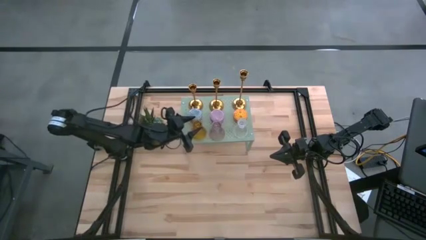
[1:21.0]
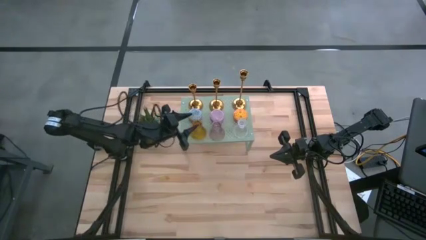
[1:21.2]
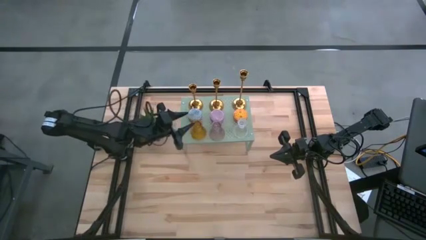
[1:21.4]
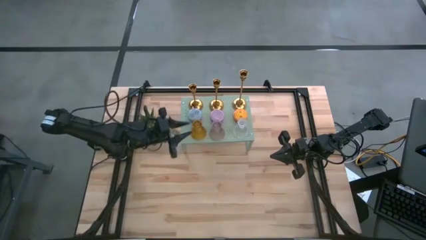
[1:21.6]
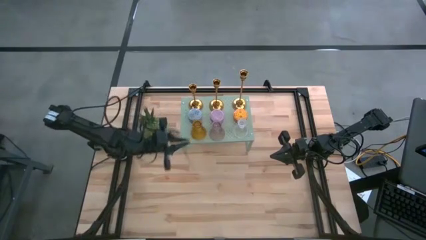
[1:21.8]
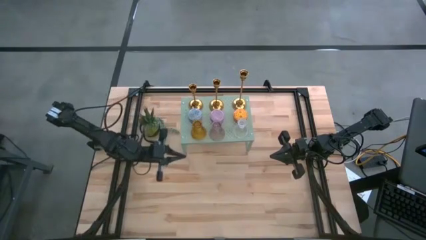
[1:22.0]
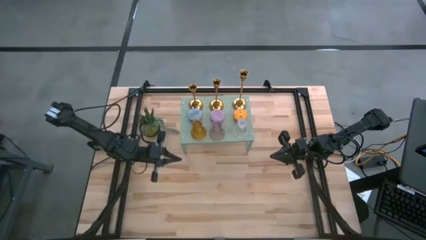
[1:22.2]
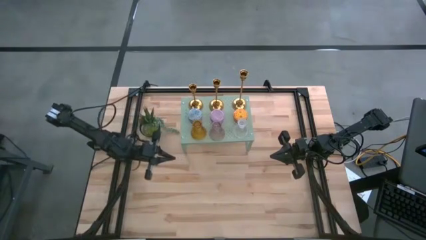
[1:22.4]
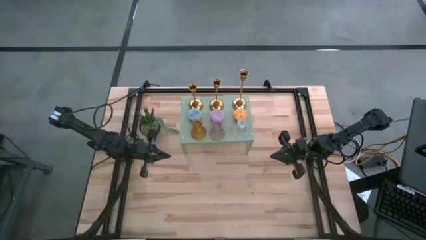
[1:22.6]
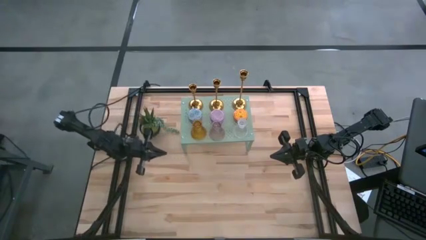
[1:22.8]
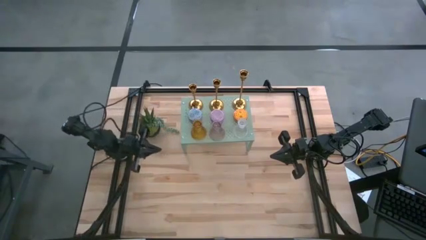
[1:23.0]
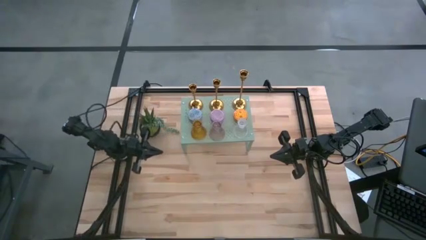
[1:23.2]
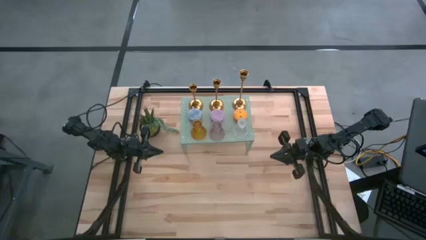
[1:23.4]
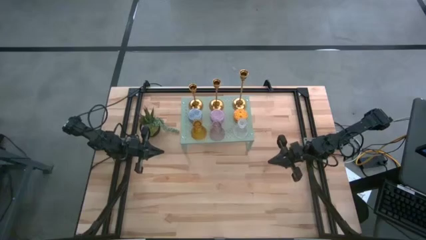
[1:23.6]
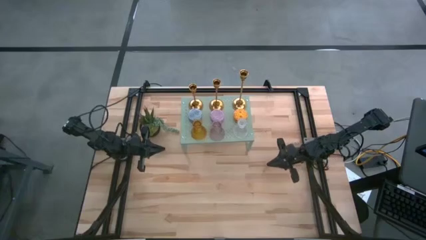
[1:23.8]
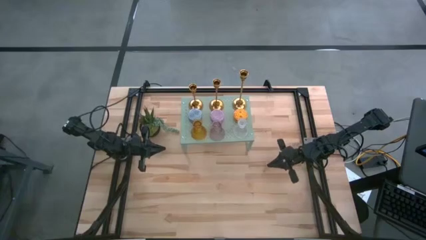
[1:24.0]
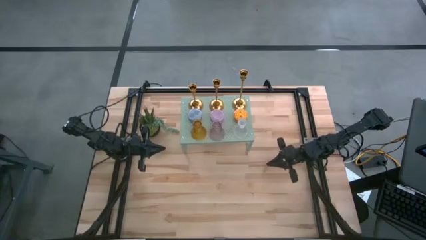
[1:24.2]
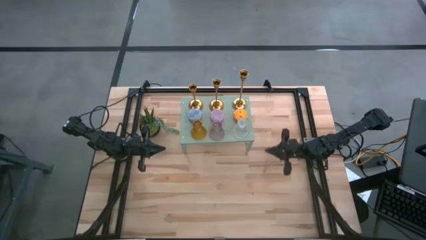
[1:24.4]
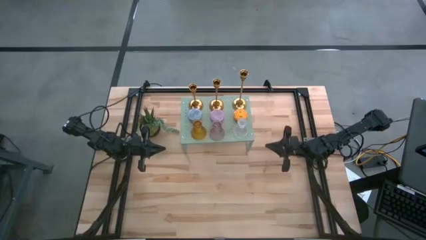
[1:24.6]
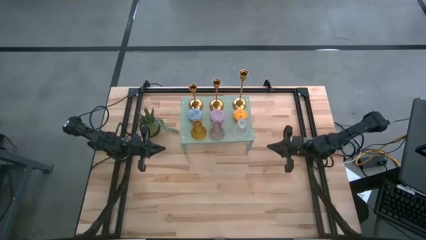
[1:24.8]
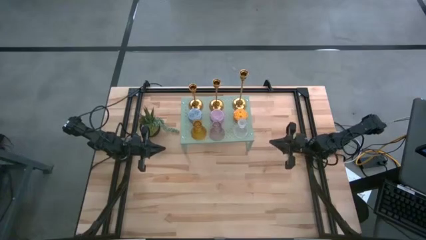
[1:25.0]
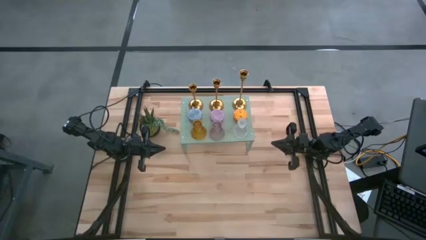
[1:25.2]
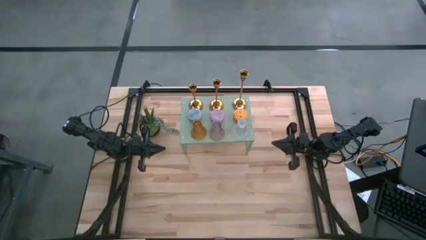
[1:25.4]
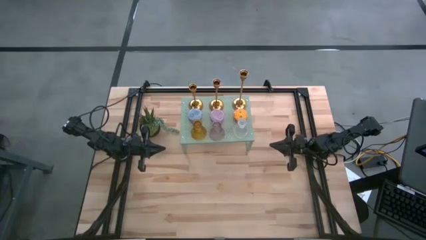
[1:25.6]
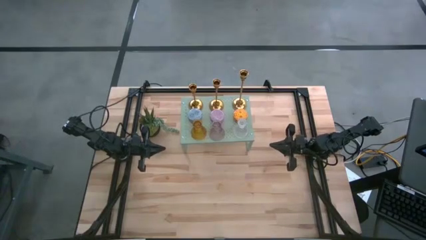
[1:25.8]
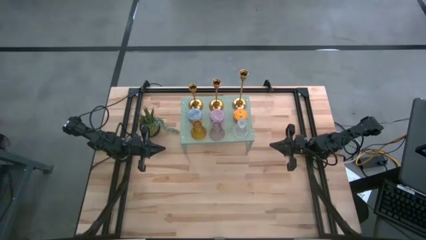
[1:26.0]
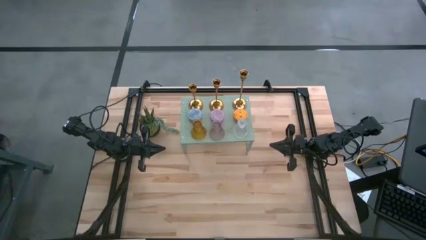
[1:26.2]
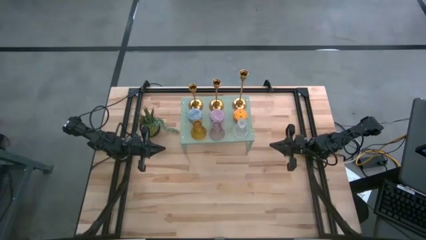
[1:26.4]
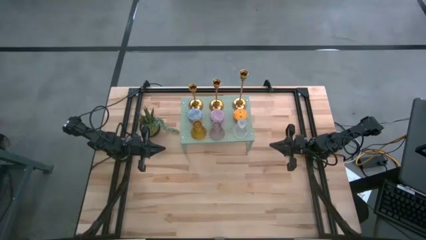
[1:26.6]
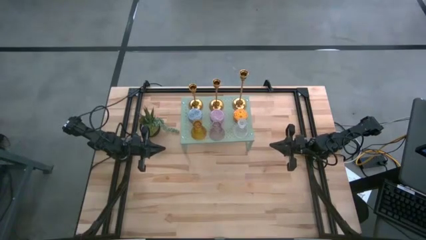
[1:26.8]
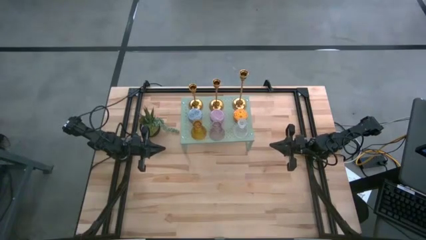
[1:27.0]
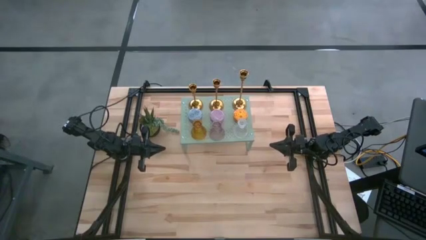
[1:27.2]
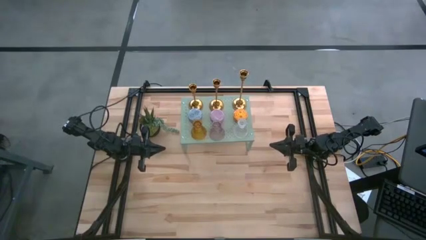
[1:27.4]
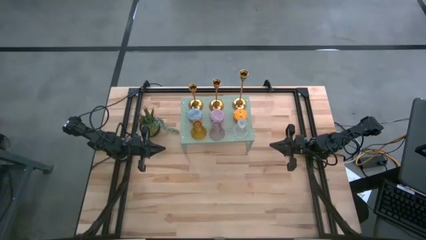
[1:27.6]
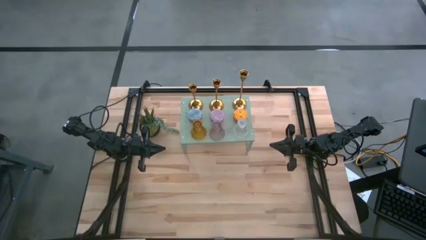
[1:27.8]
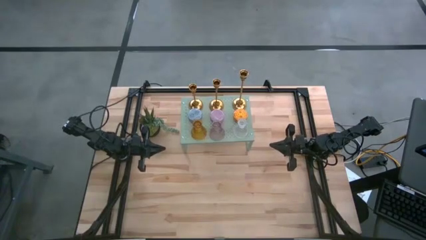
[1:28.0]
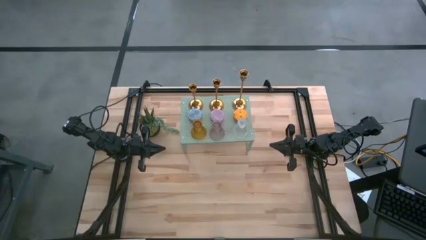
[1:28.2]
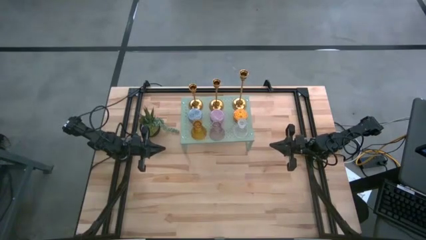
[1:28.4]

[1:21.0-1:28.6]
Task: Pick & Place candle stick holders
Return to Home Position

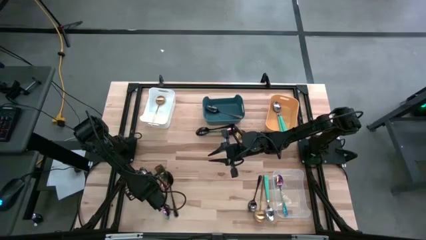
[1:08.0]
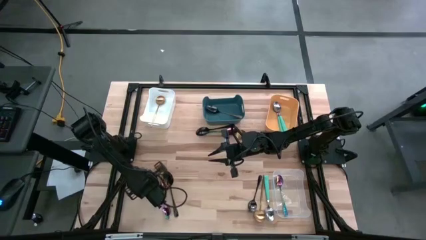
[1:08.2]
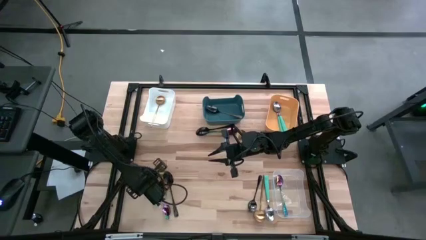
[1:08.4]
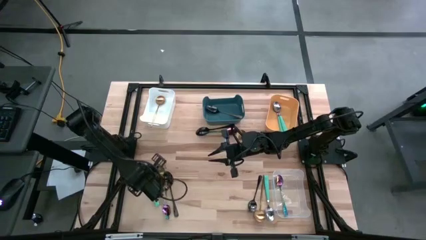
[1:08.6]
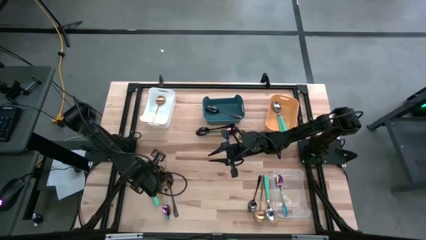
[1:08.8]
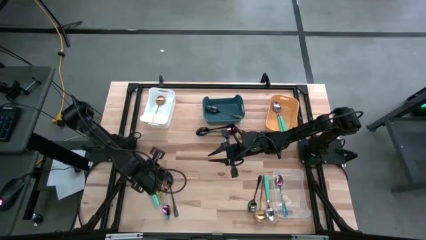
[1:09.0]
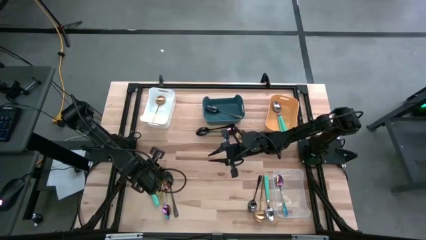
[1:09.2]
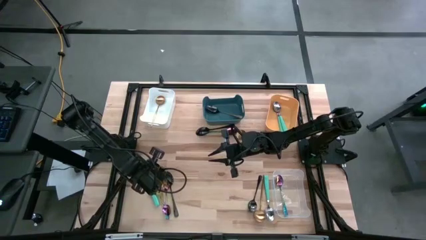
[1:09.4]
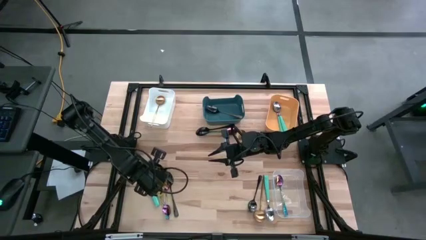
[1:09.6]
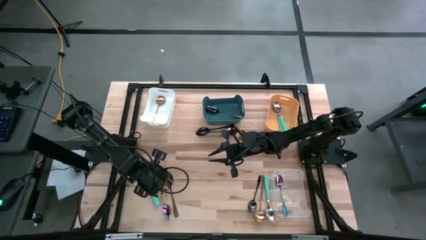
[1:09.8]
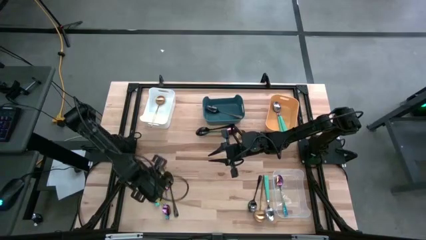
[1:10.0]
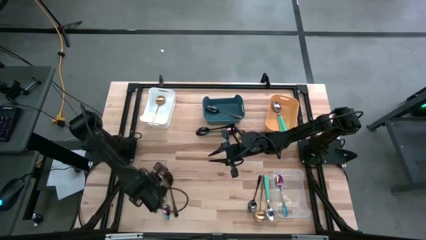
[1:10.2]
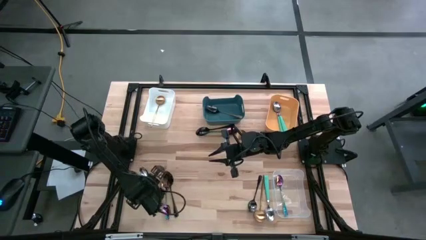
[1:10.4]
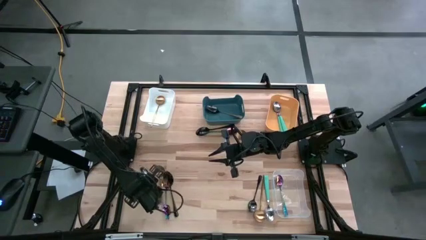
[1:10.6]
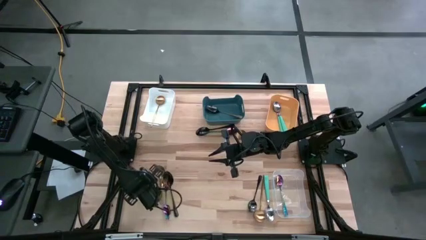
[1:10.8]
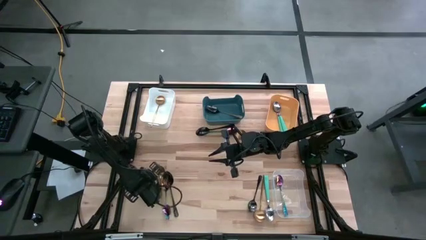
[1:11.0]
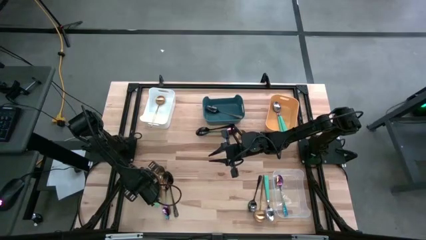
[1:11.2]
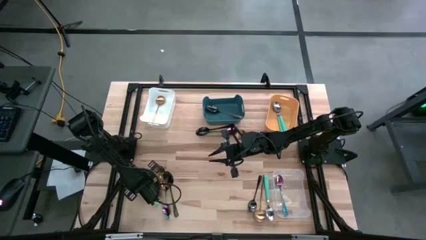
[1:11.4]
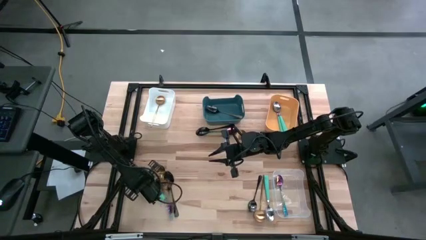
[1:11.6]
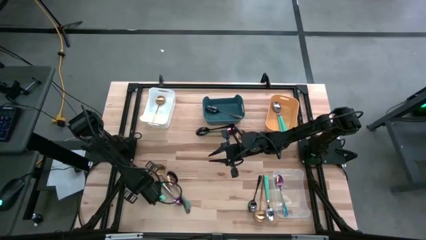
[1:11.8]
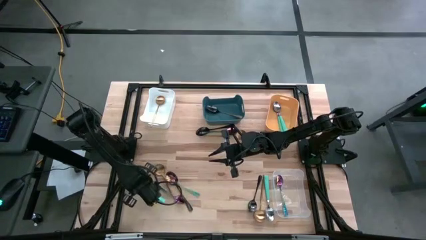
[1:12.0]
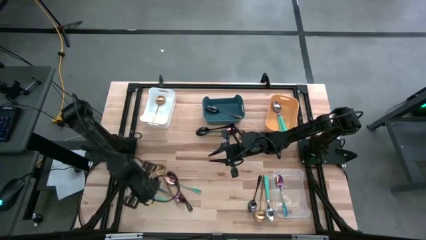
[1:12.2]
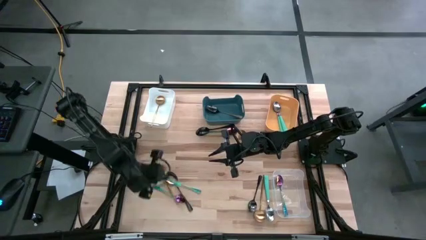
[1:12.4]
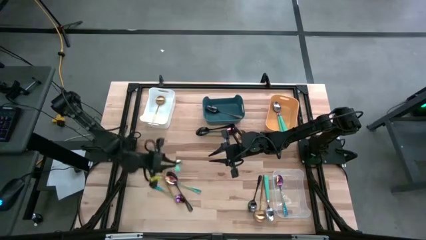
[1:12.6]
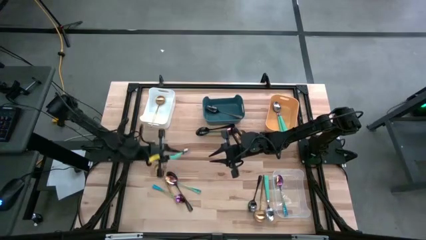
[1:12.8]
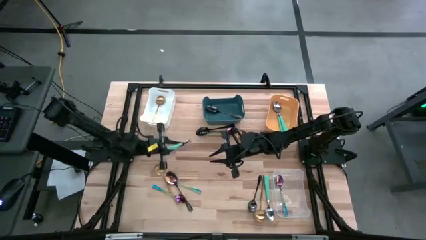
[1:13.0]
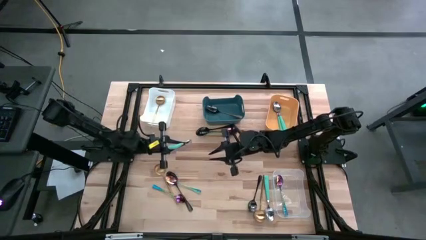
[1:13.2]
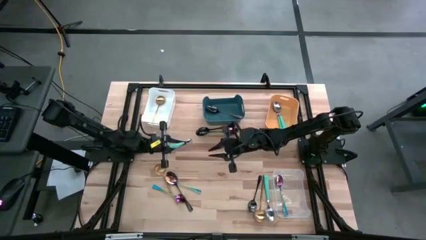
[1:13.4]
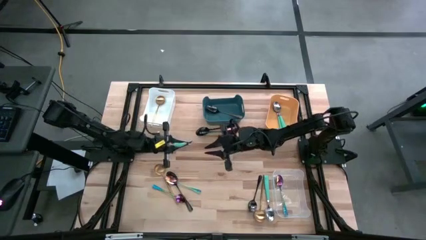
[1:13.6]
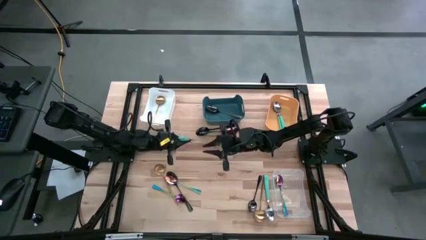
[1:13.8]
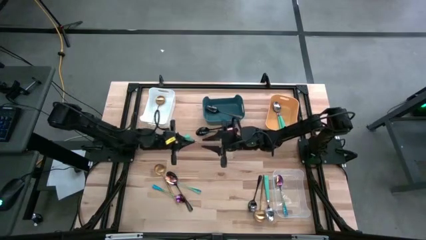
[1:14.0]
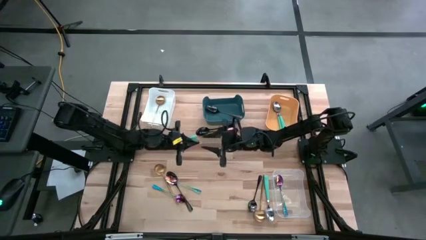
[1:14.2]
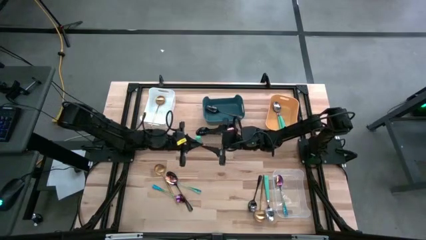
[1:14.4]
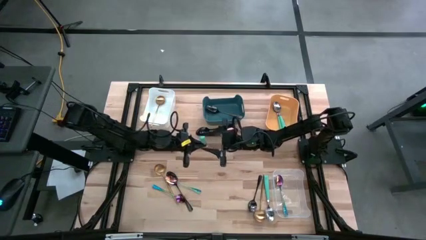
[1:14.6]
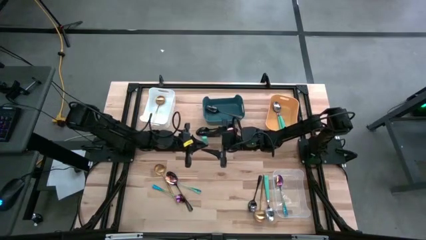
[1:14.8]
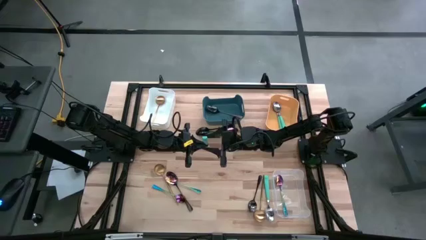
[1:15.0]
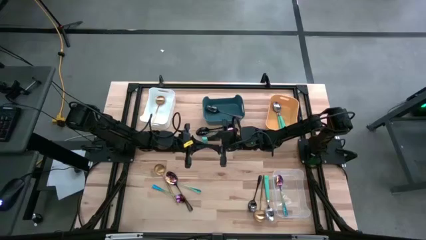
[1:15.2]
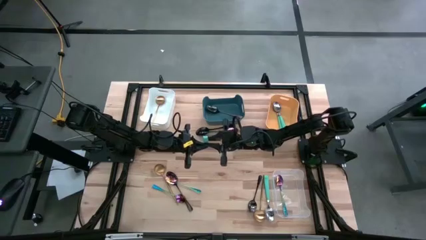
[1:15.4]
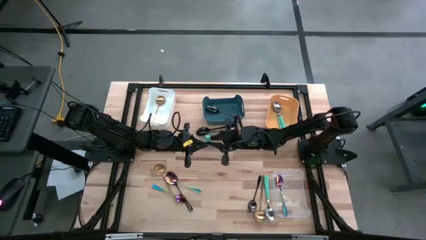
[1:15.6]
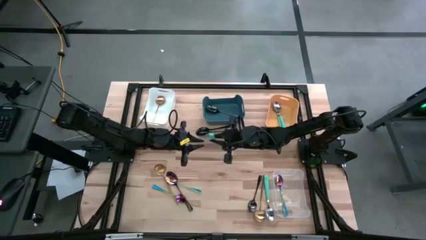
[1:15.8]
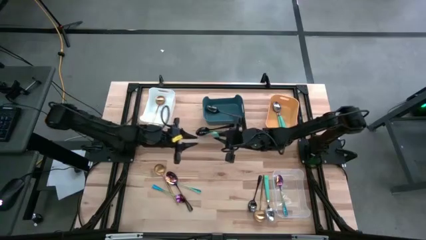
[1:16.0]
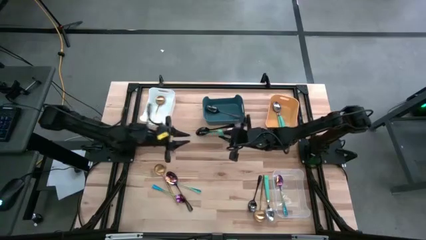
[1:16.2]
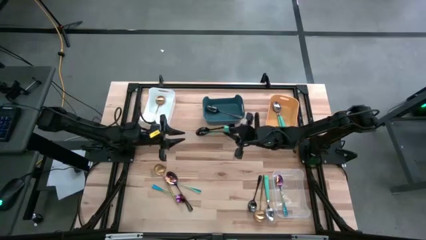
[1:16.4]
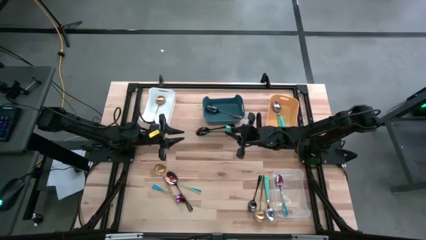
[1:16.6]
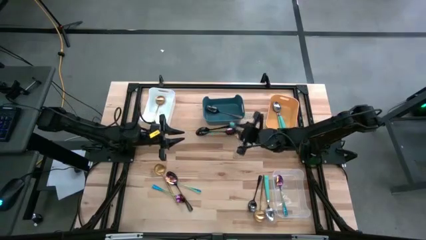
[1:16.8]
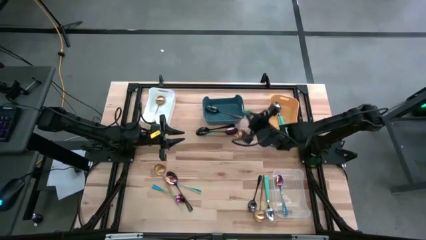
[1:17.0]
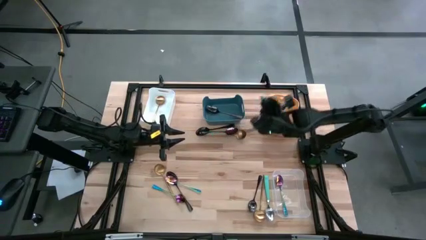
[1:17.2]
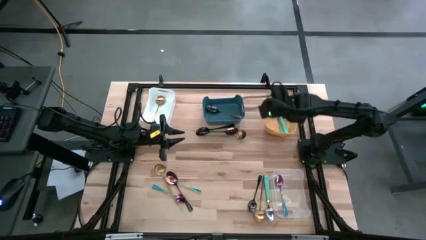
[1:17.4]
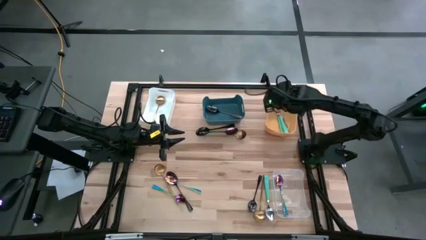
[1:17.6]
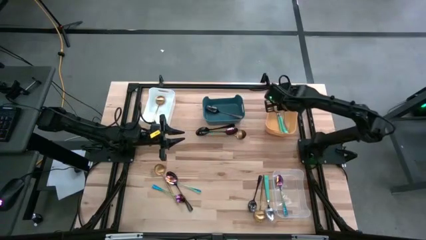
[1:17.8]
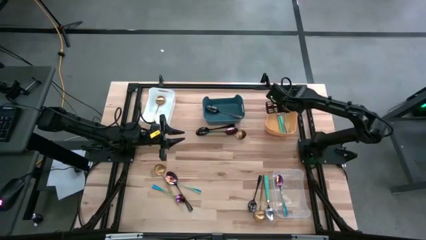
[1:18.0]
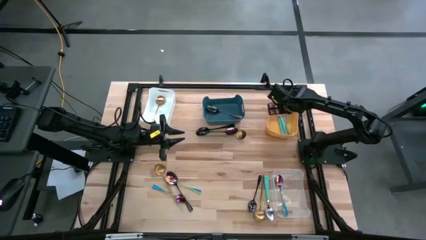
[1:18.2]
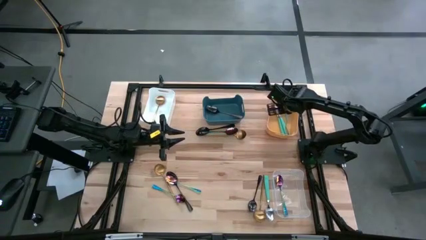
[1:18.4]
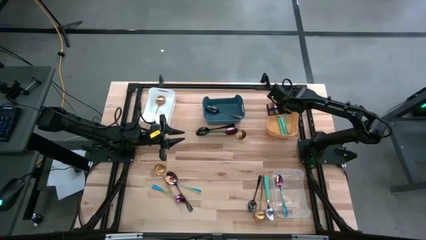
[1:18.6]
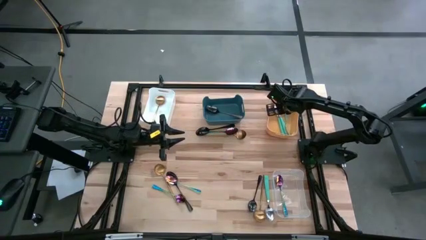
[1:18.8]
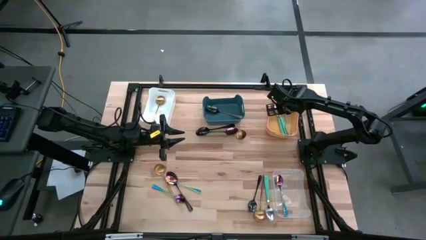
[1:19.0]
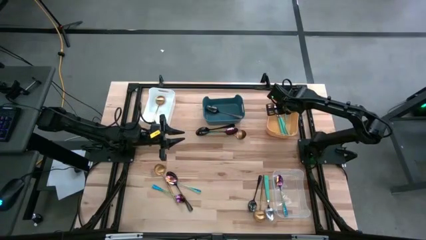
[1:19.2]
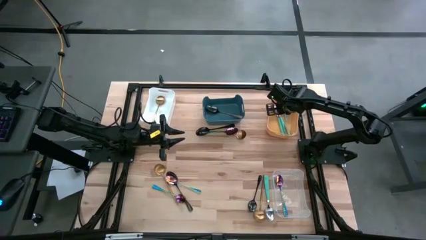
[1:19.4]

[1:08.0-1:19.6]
Task: Sort silverware by color (type)
Put the light green spoon into the orange bin
